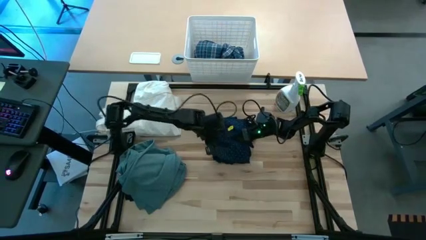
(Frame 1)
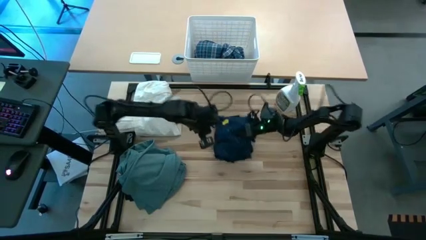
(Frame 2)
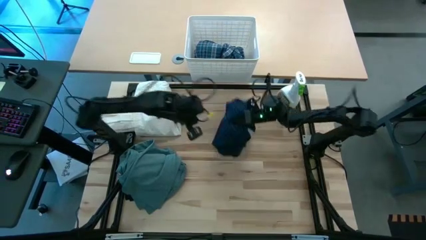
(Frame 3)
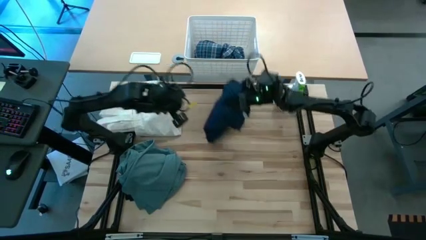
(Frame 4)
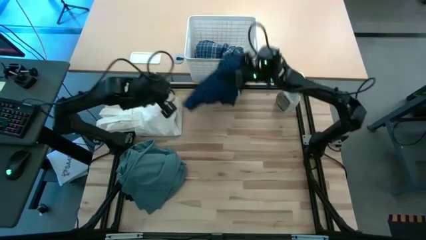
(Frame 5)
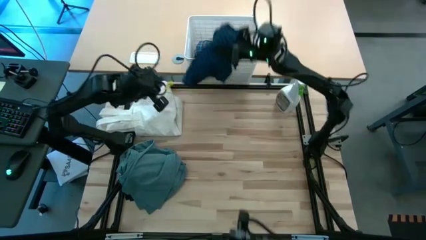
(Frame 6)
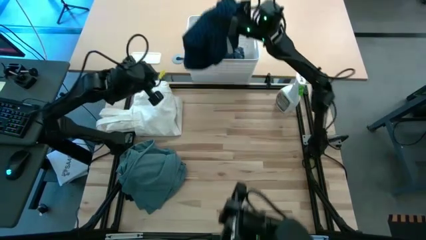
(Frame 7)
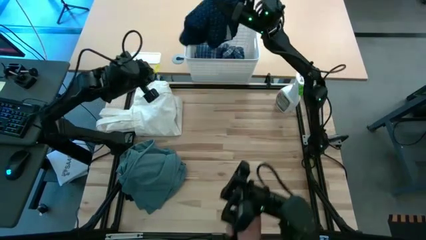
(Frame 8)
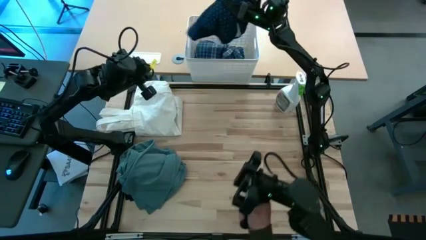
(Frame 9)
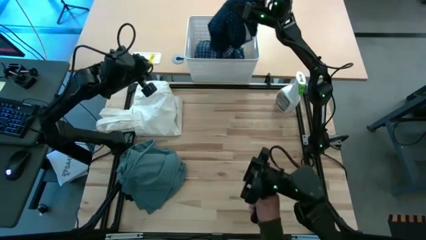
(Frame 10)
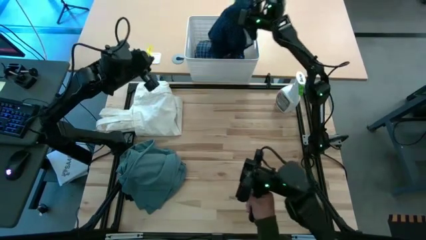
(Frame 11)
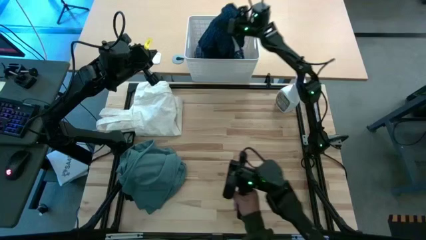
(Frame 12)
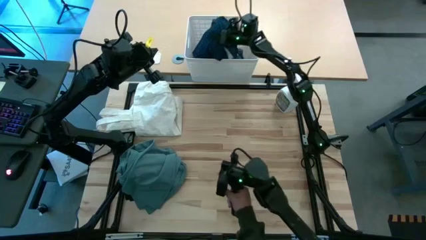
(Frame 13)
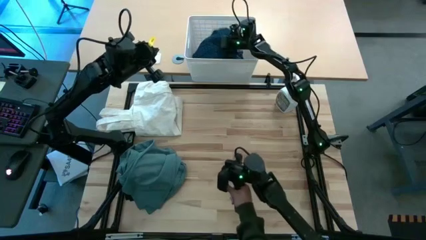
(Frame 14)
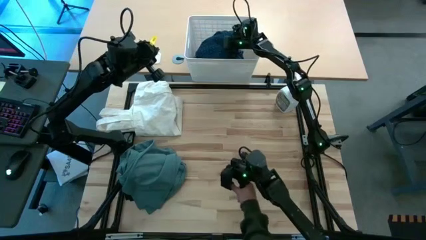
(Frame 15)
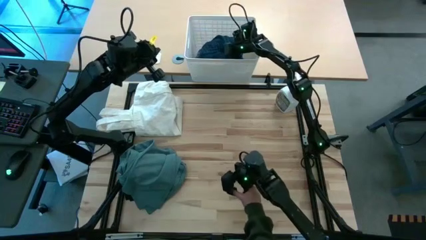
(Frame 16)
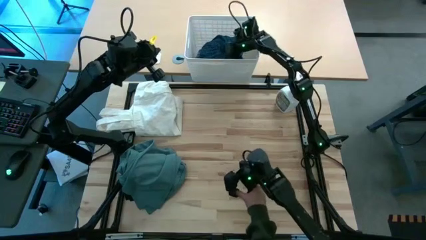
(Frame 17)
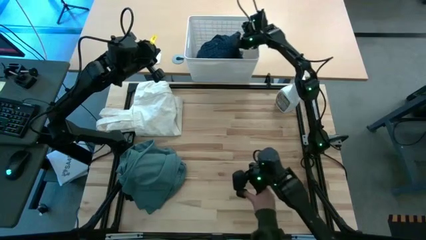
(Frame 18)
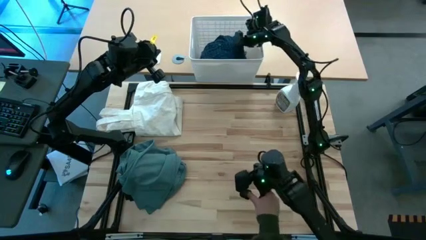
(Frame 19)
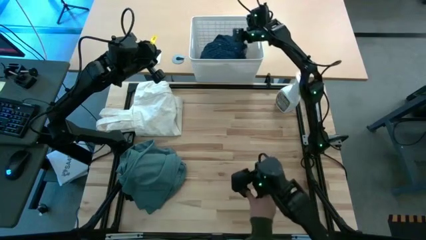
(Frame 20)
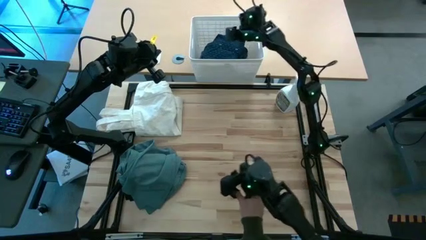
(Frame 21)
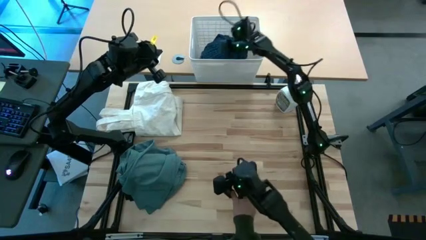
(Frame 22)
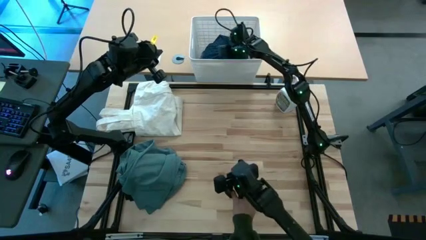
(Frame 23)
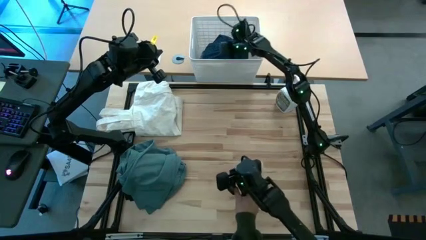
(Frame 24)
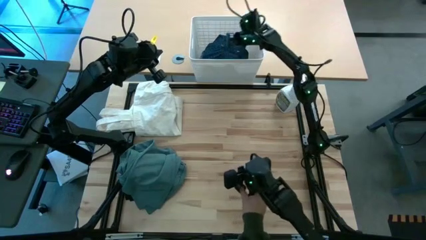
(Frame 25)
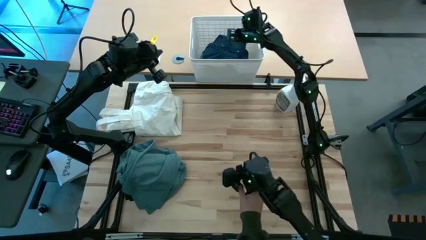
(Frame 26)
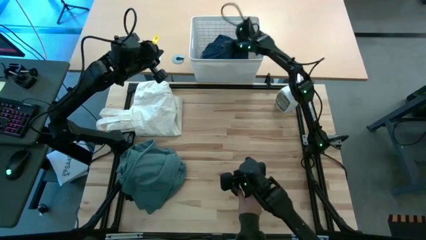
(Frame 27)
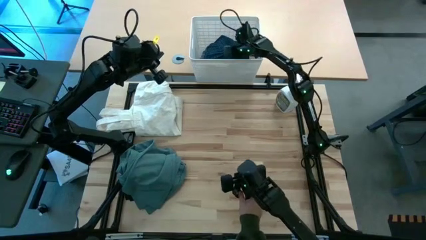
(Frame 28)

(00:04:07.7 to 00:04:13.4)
Put the folded dark blue polo into the white bin

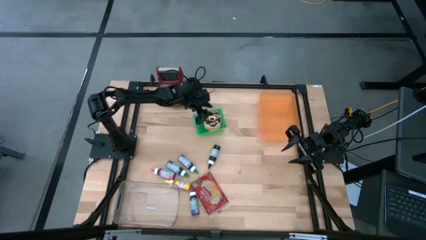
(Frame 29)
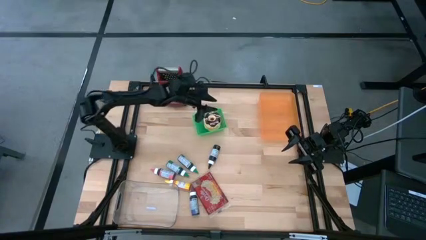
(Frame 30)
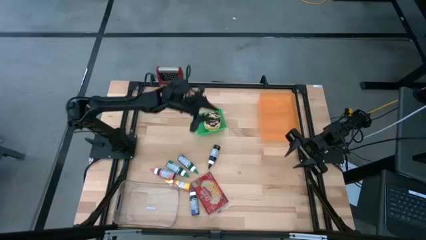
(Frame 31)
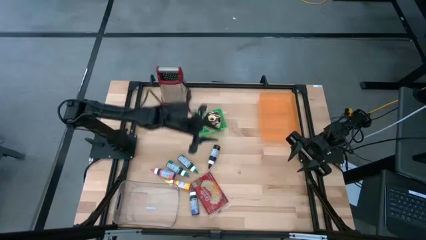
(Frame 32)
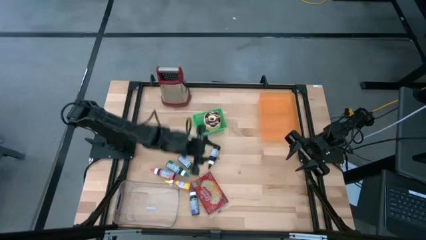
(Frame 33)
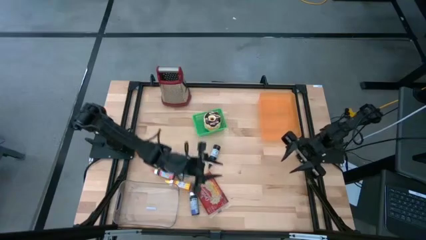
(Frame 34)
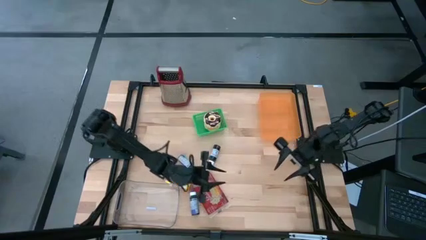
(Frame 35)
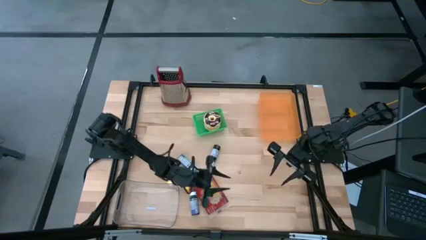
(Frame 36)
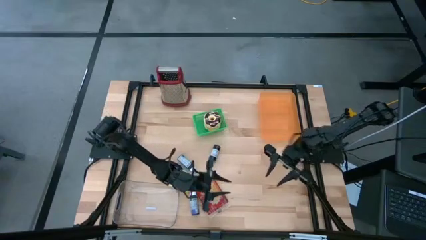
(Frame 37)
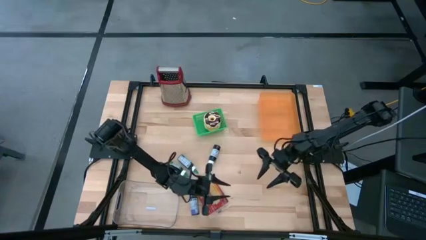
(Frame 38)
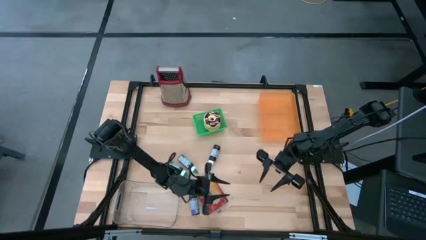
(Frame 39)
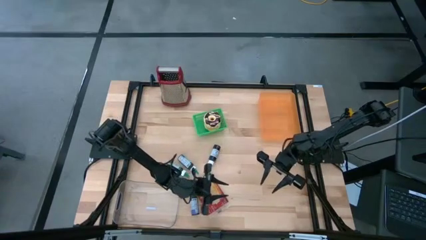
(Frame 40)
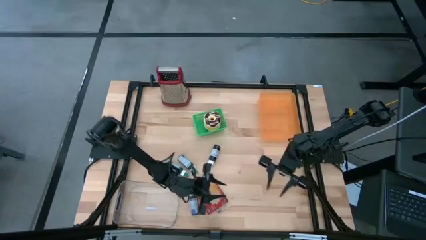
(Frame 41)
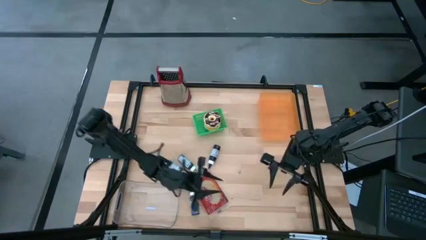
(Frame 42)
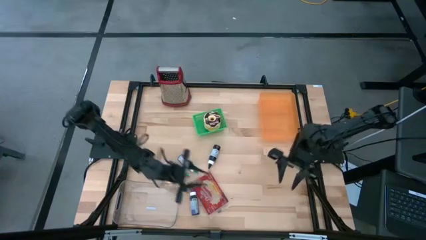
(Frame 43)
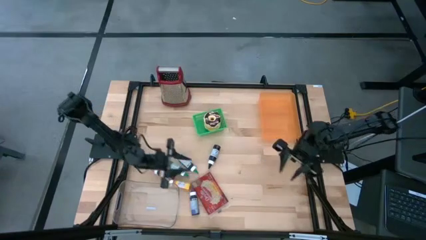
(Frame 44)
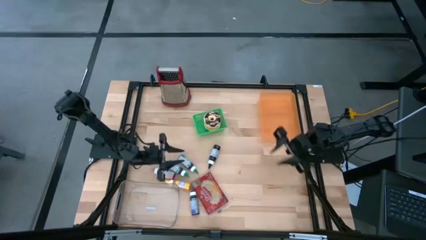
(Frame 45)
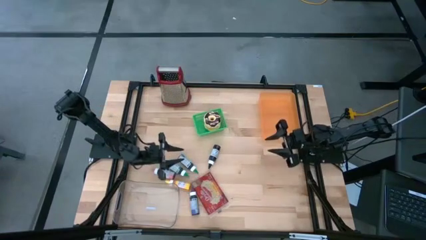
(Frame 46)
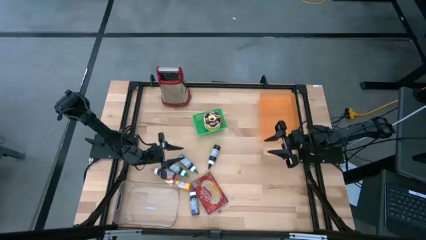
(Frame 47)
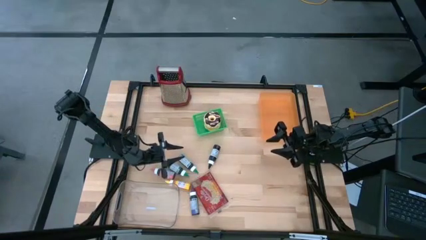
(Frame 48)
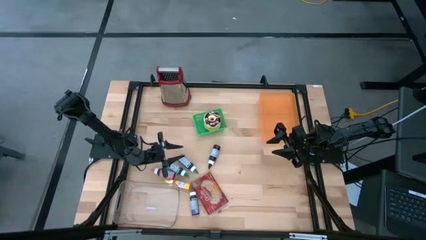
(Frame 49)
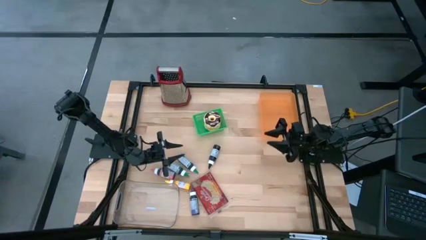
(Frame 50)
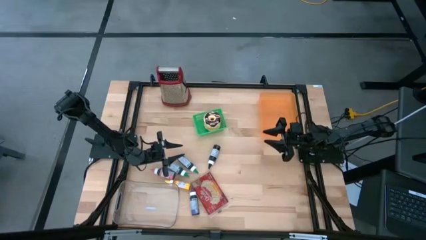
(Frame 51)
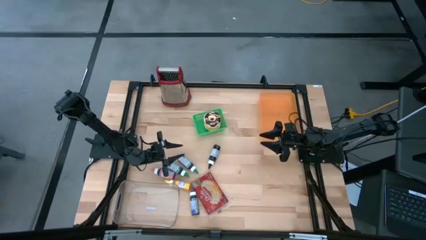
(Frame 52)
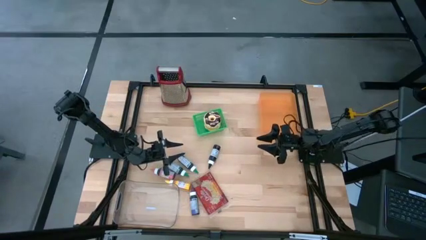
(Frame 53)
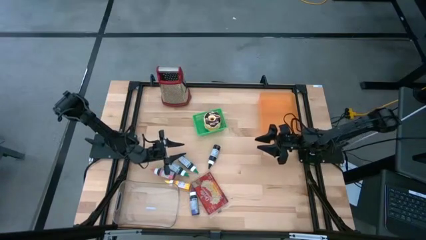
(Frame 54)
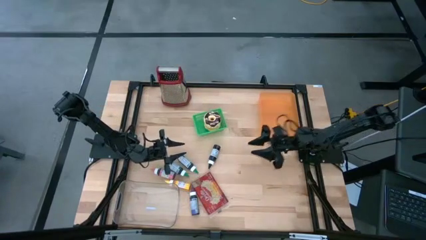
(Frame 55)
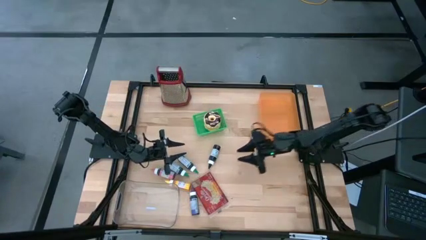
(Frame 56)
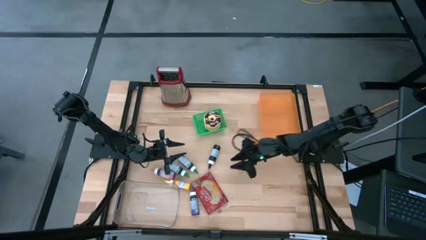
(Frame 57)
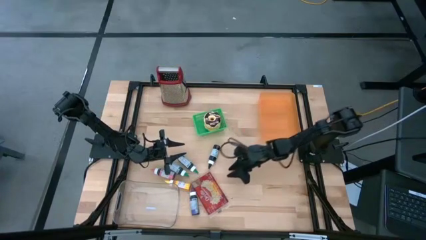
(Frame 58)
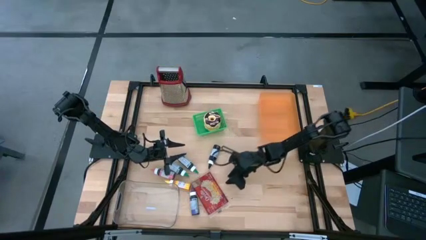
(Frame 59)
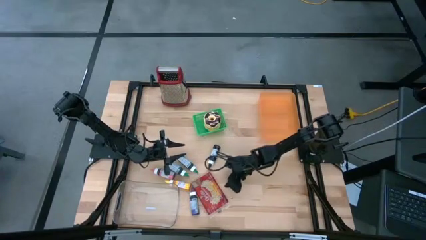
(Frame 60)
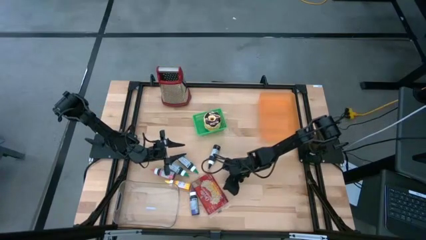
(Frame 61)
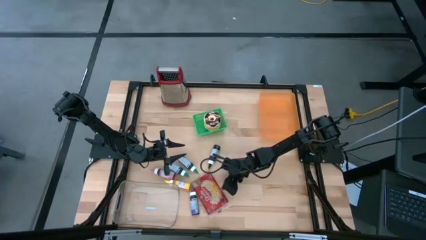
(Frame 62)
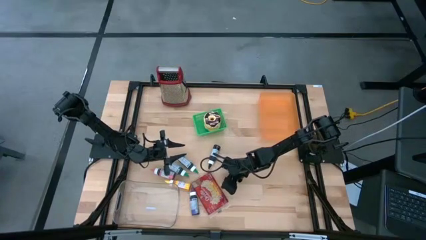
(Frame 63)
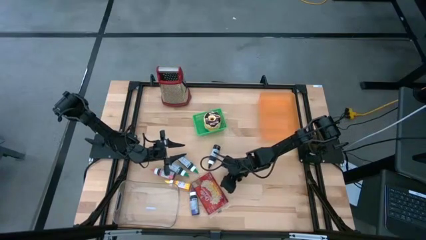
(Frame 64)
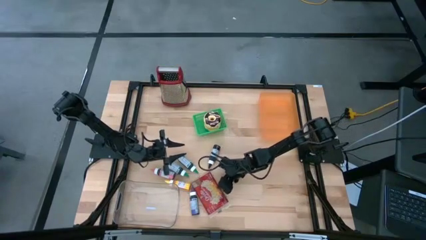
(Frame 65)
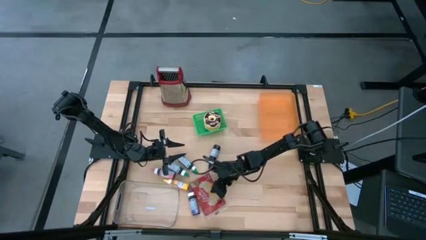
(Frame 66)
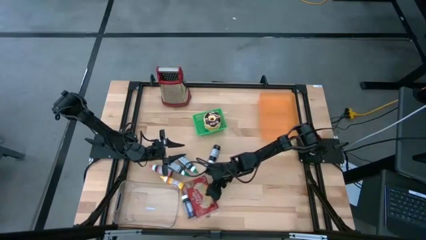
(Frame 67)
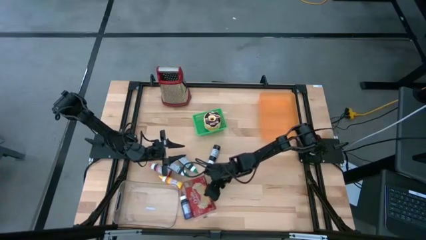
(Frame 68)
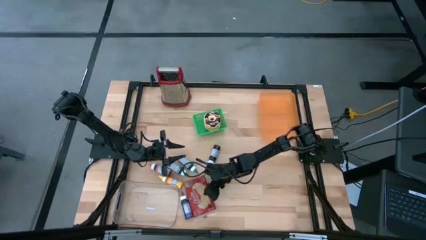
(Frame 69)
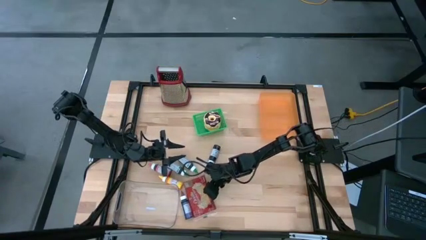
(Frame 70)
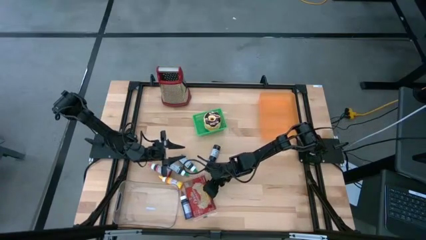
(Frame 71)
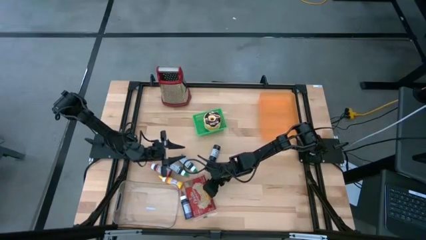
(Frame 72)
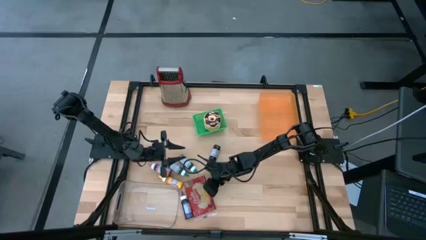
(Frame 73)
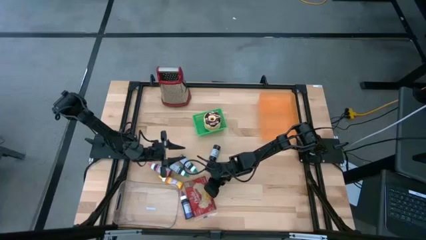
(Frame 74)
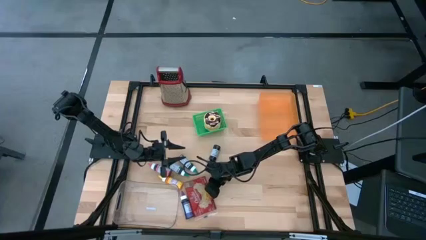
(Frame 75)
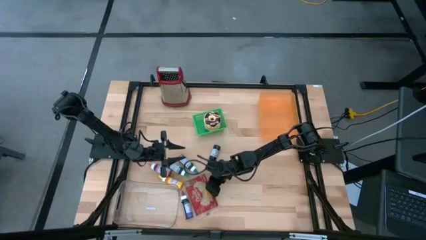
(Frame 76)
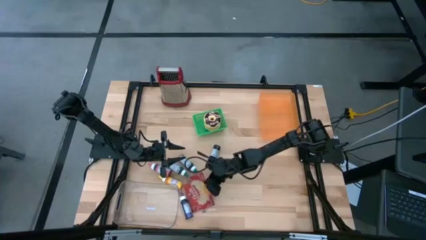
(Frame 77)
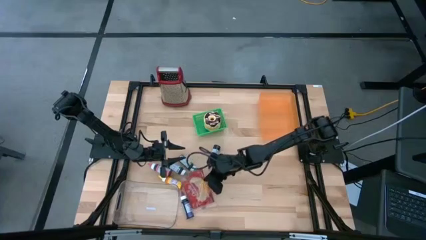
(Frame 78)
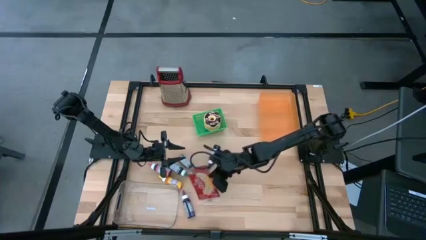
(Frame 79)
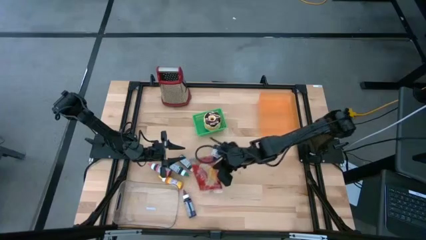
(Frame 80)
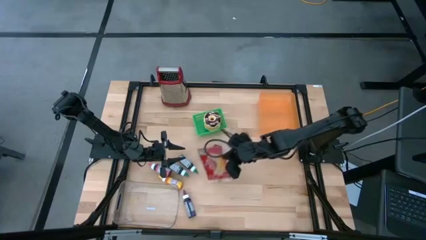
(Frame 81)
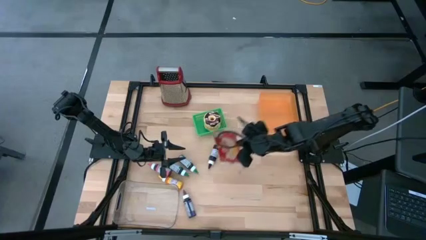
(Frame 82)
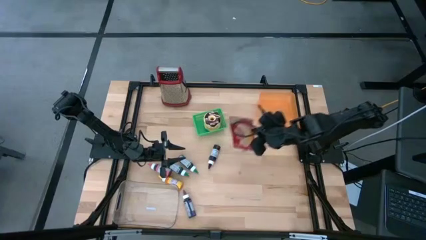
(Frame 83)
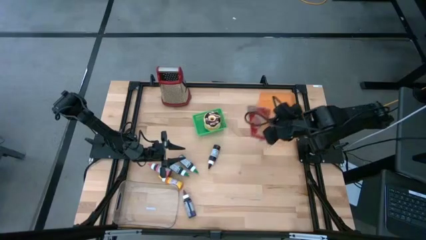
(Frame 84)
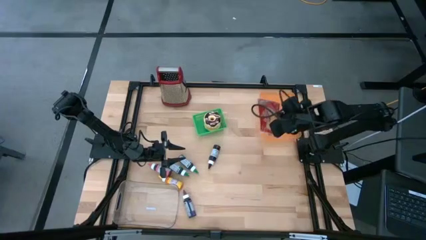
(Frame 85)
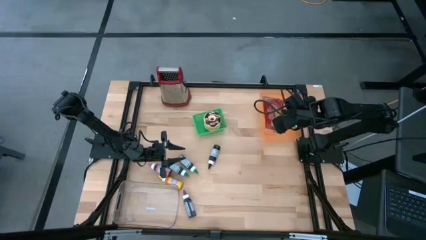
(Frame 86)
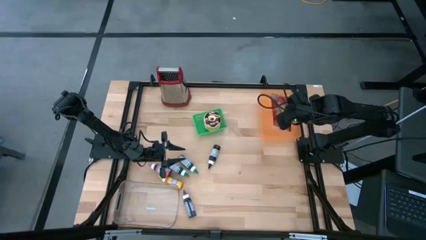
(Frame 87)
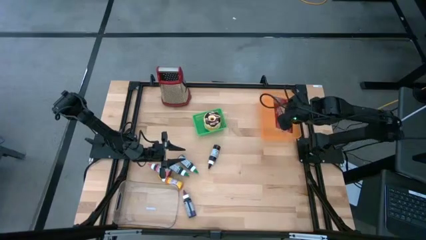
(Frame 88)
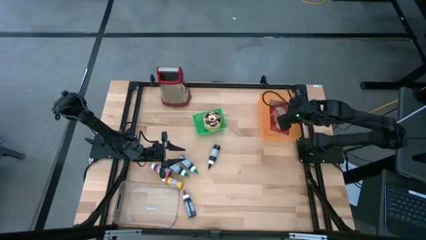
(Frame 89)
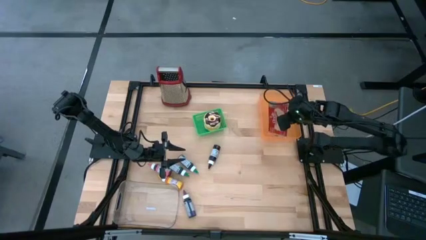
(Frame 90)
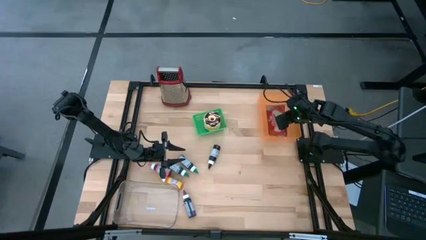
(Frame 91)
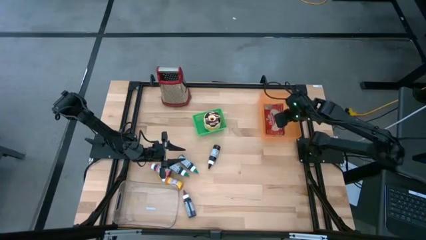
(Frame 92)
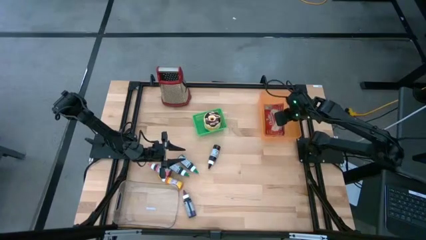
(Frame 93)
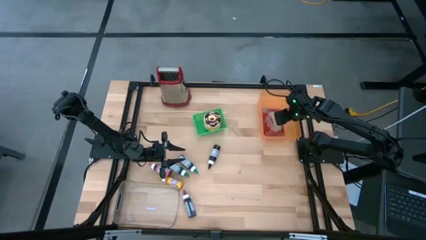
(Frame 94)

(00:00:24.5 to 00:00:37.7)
Put the red popcorn bag into the orange bin
